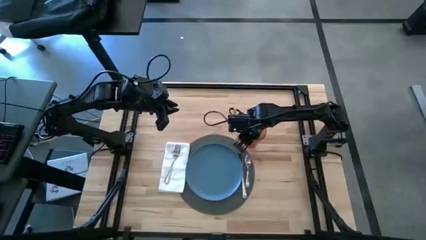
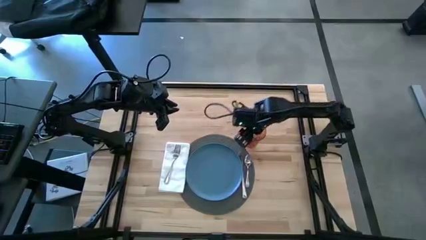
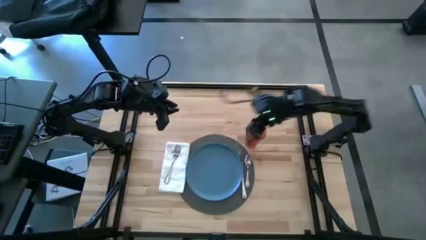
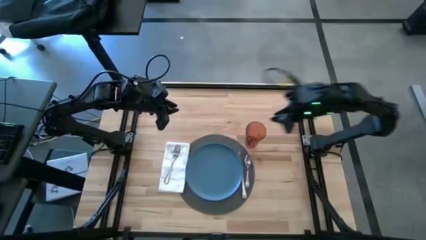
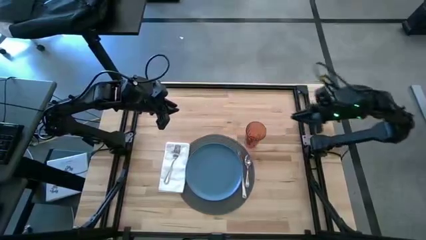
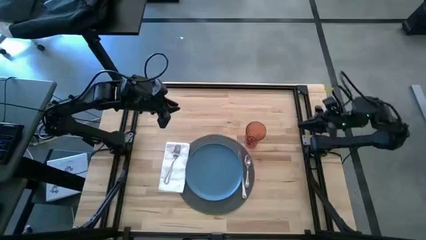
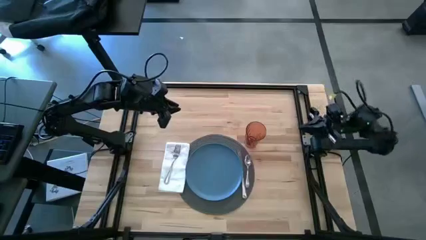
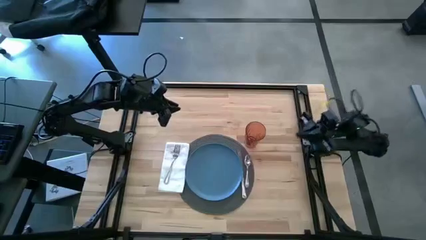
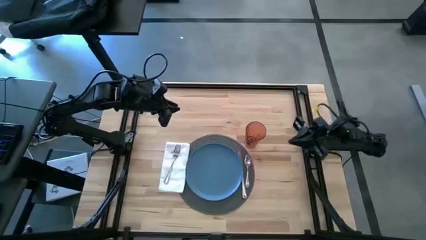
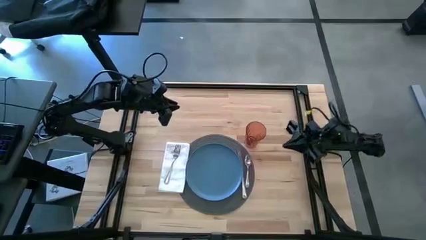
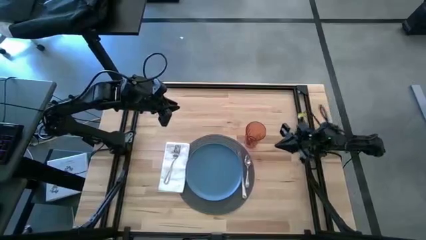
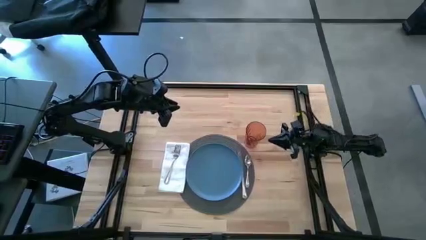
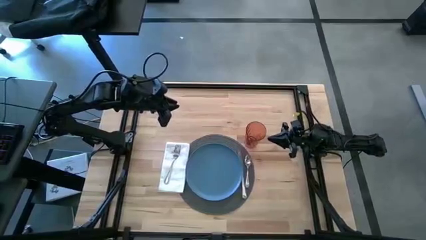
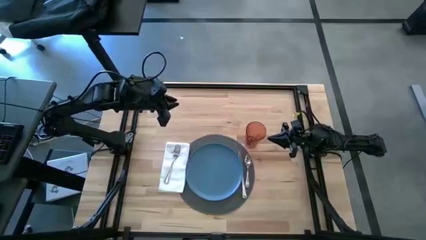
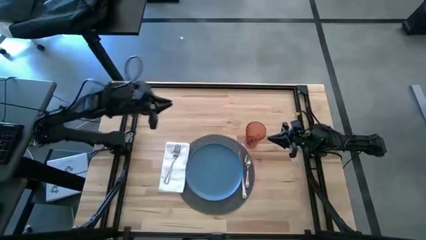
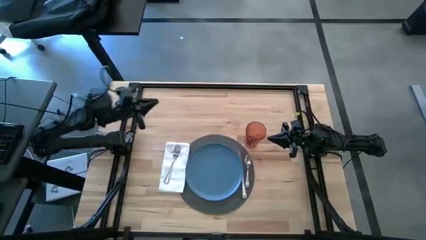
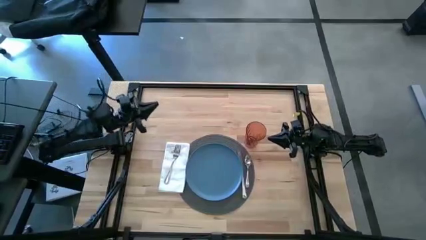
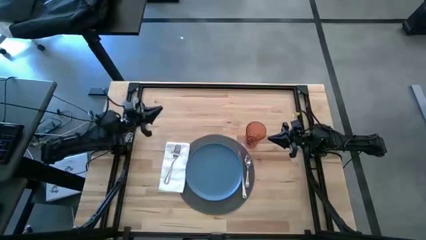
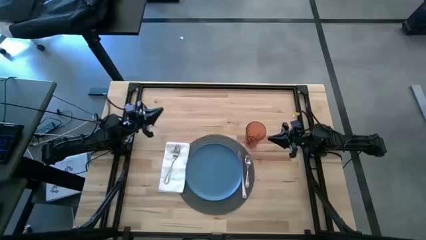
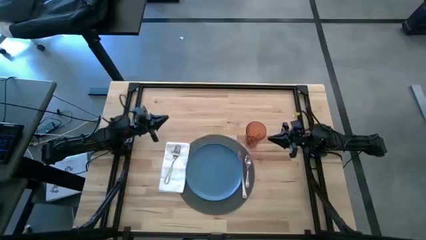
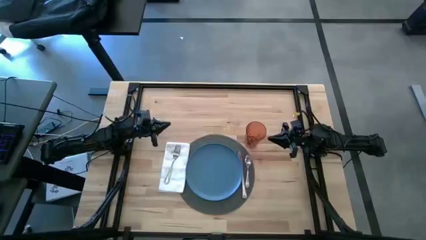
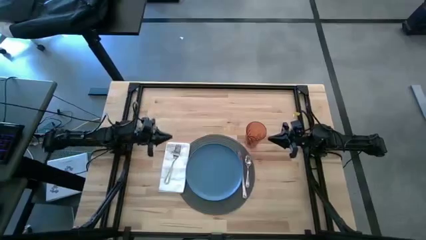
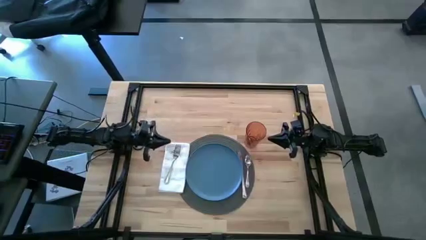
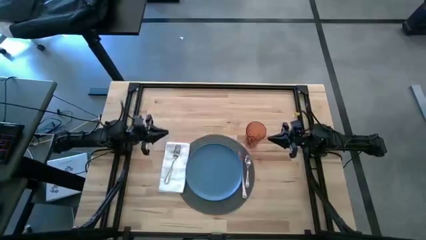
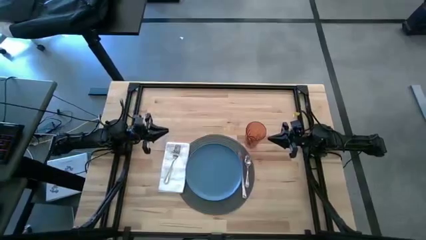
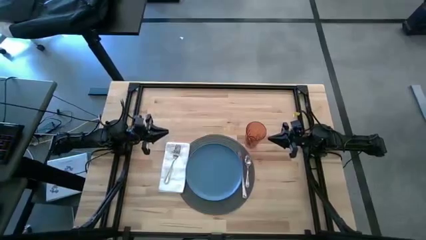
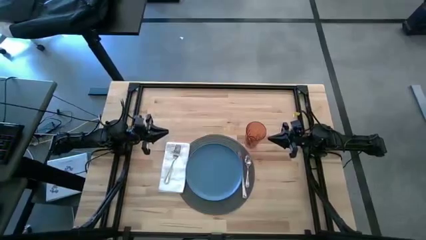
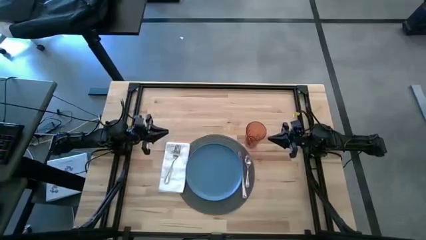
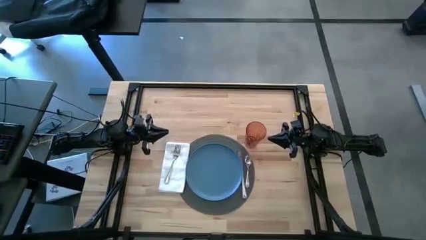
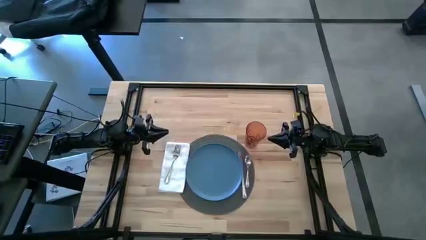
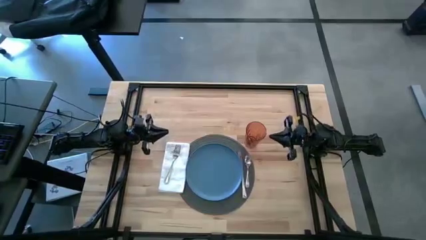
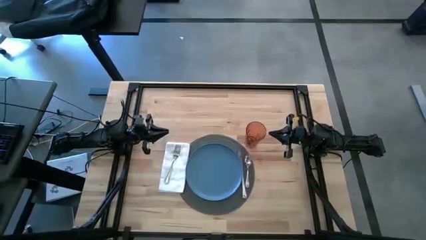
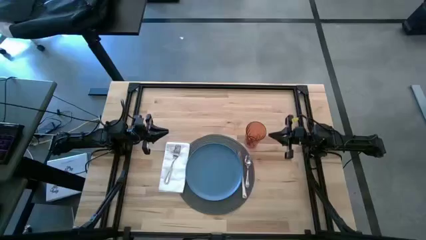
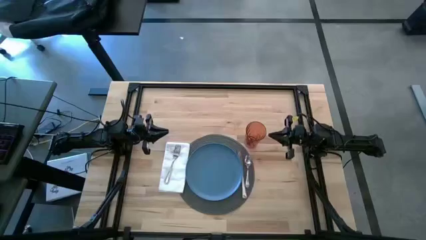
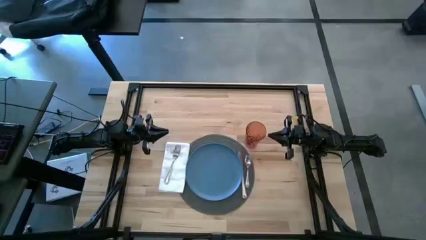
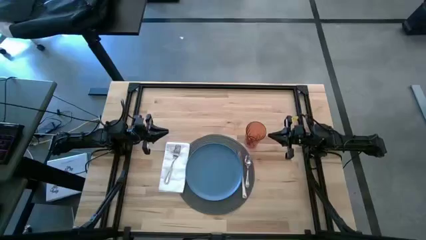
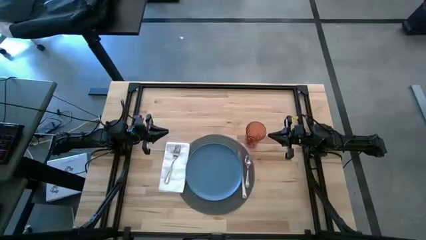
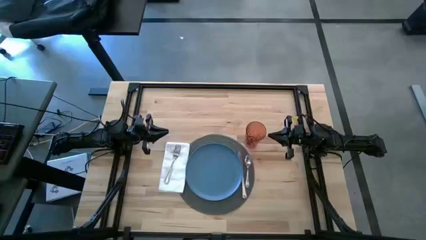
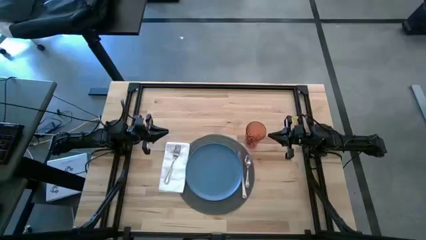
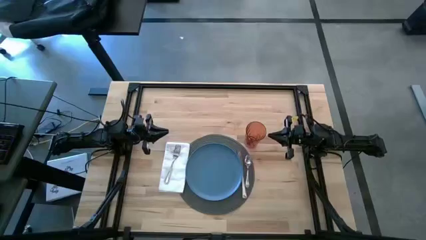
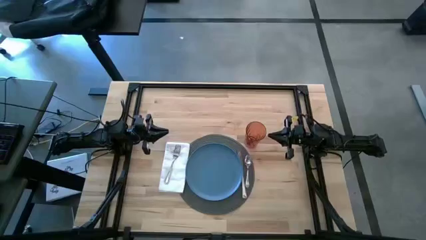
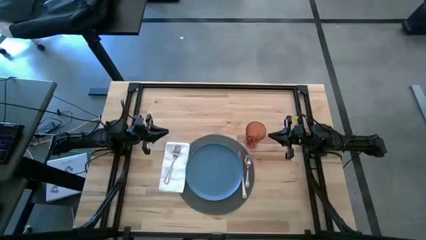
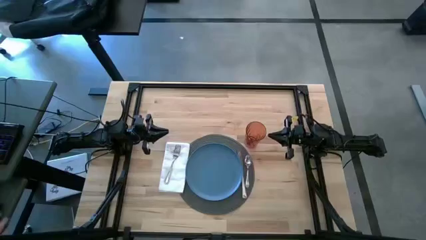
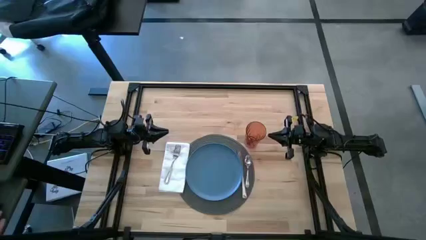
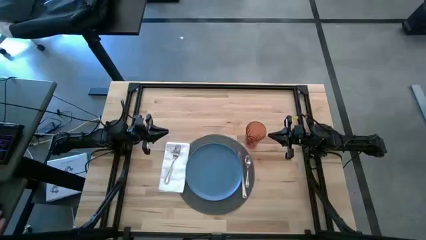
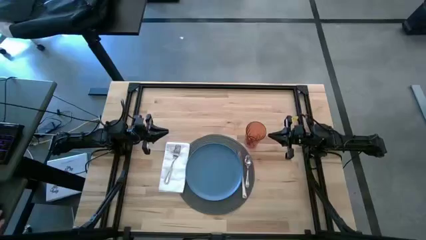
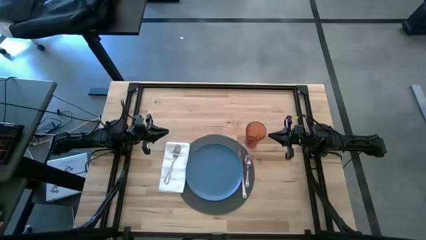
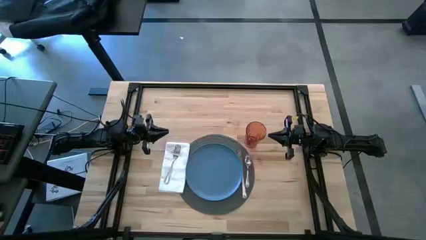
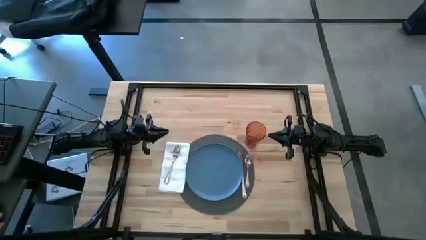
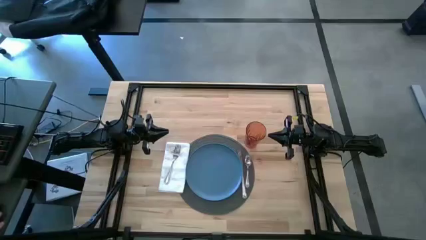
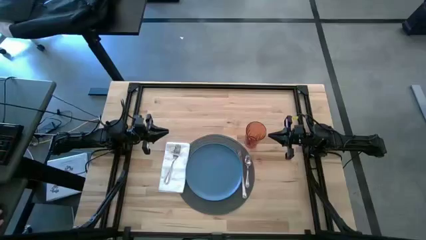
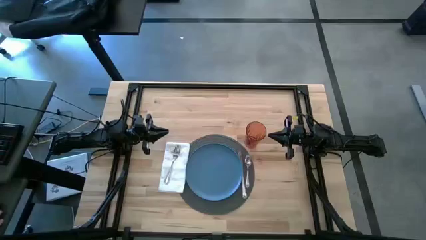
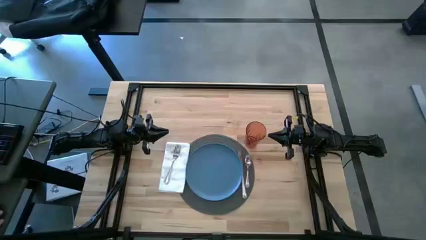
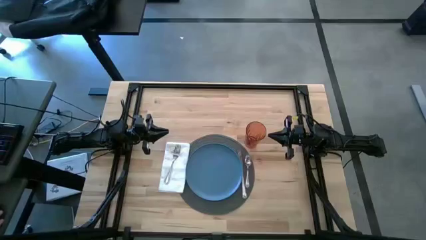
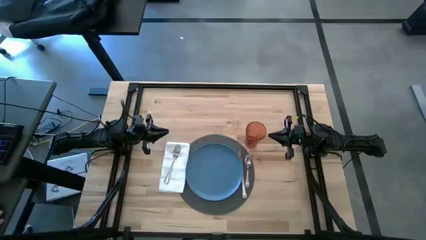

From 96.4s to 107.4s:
Task: Set table place
Return to Home Position

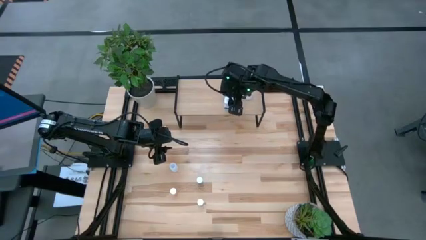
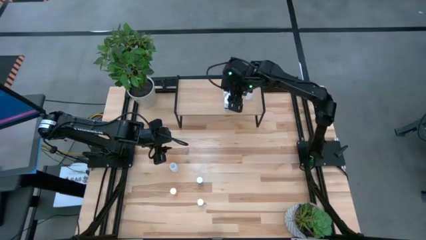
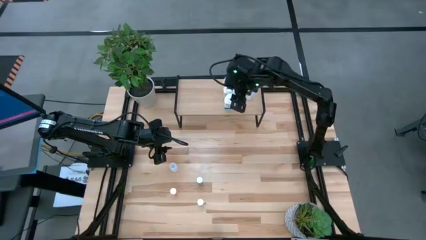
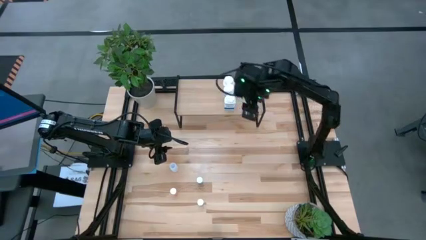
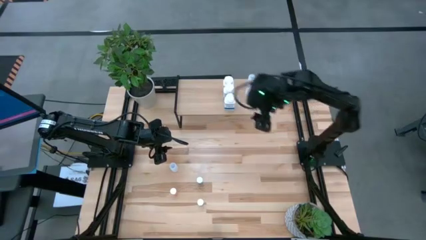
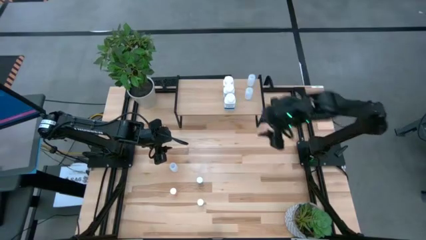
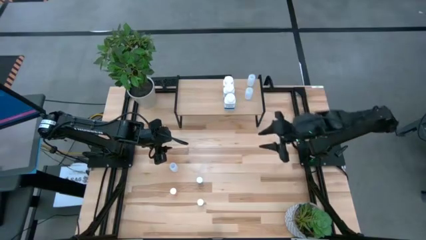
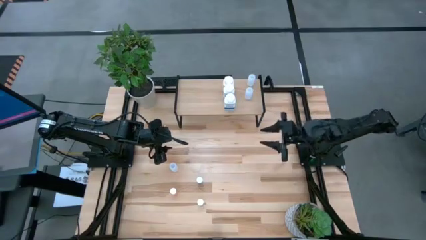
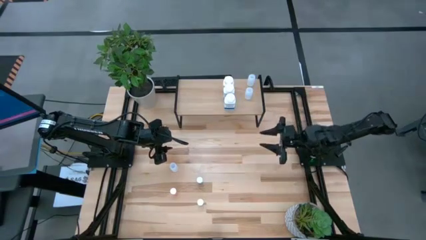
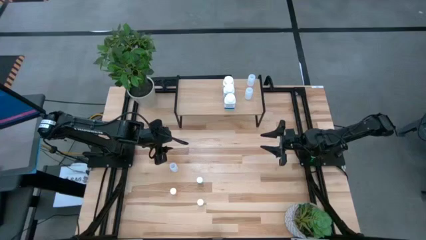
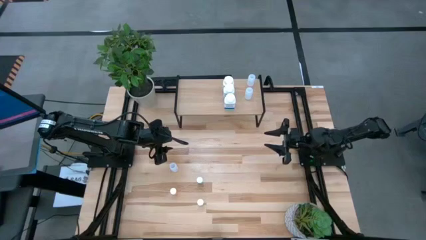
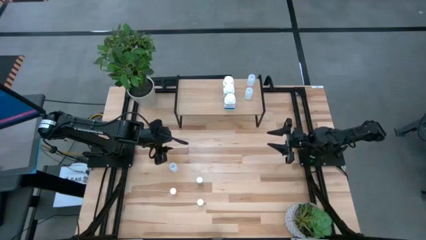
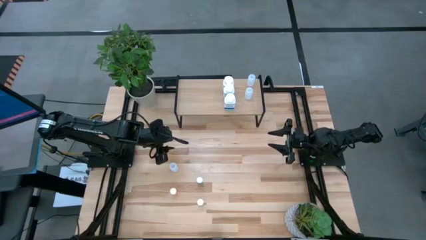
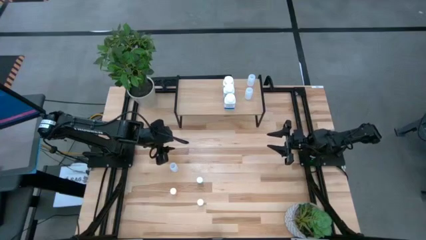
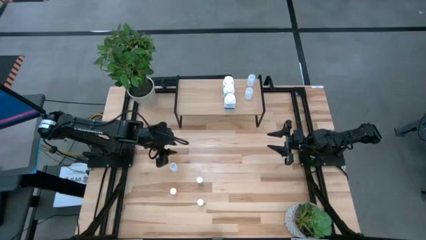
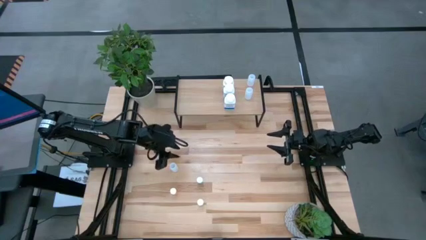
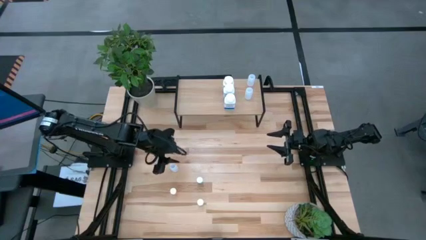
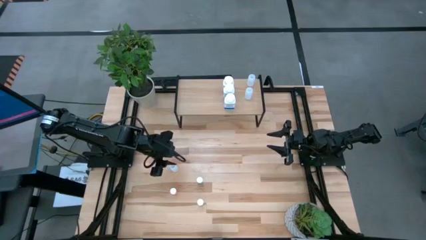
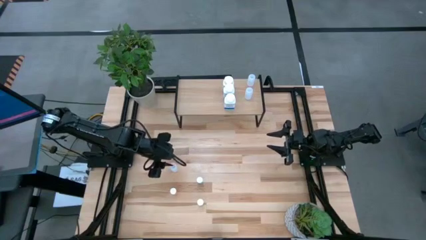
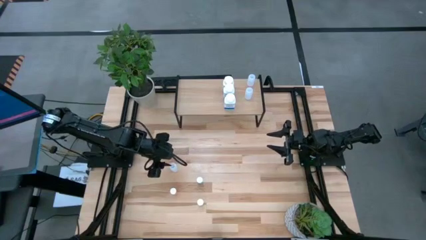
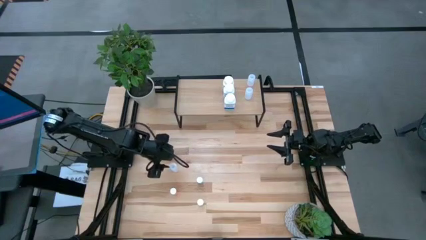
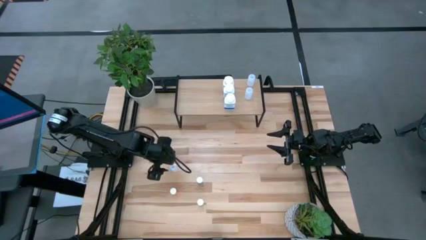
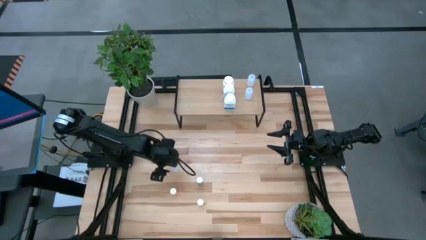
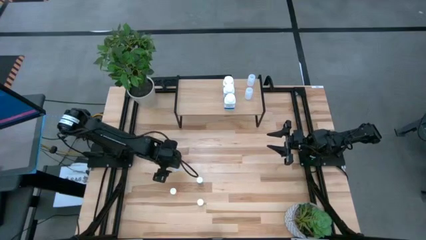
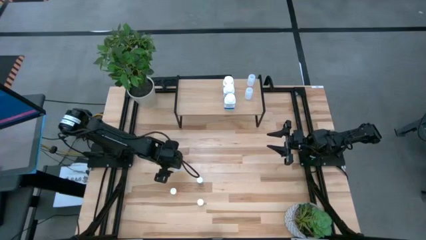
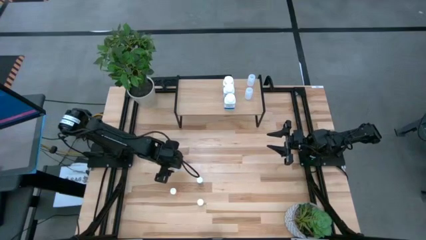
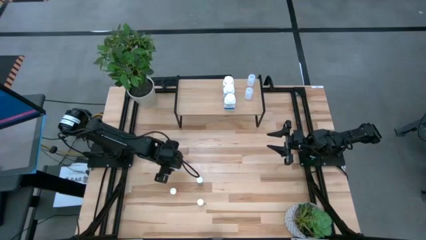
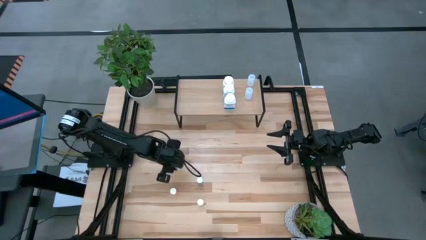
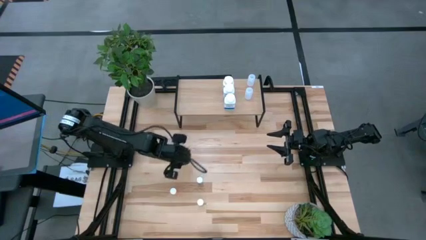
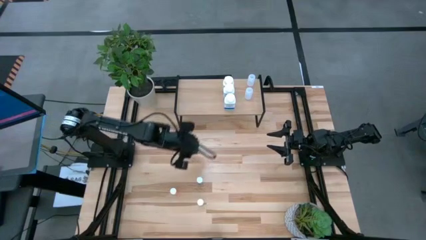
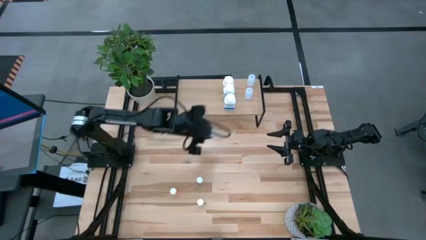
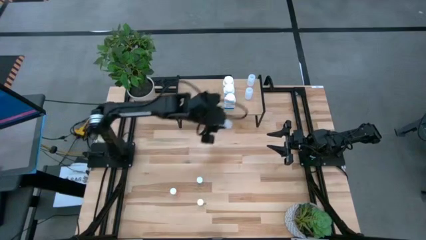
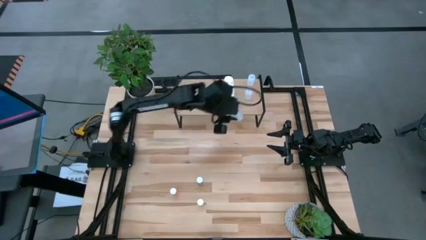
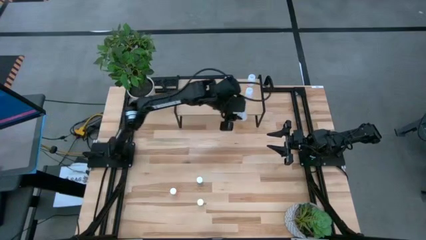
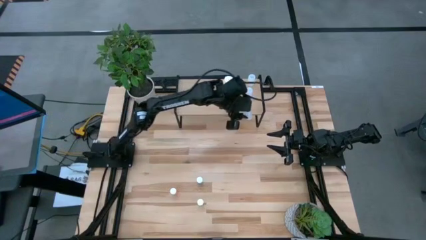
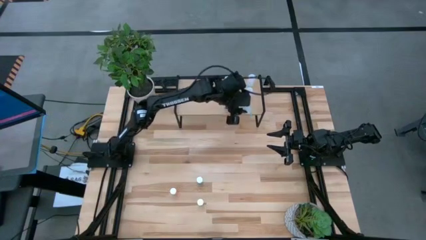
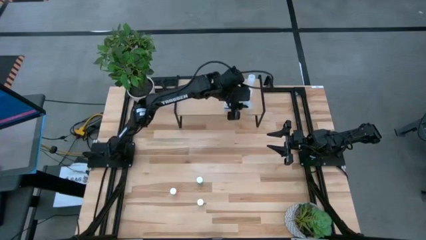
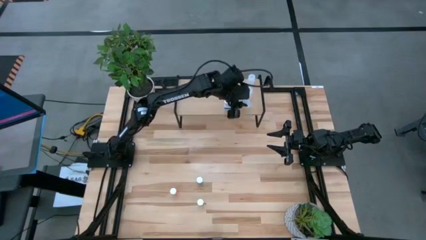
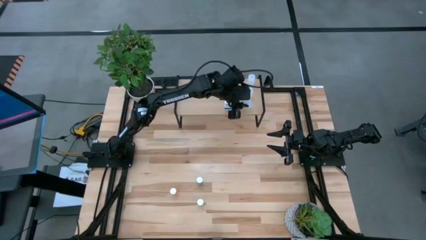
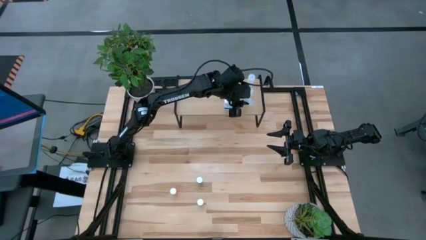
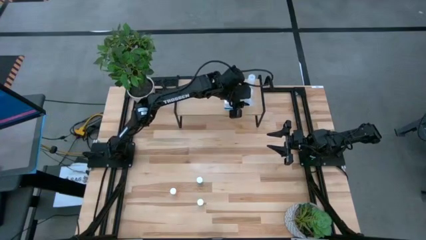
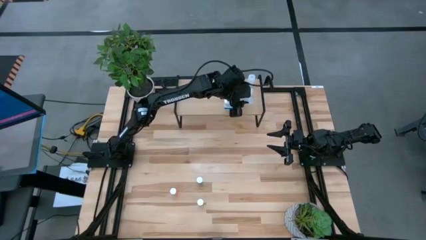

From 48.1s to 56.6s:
Task: Pick and place medicine bottles onto shelf by color
Align the white bottle with the other white bottles on the shelf
